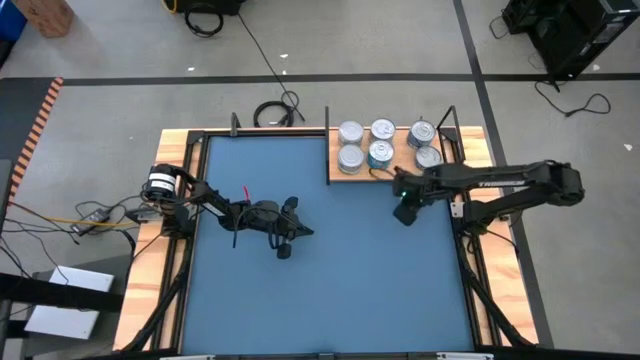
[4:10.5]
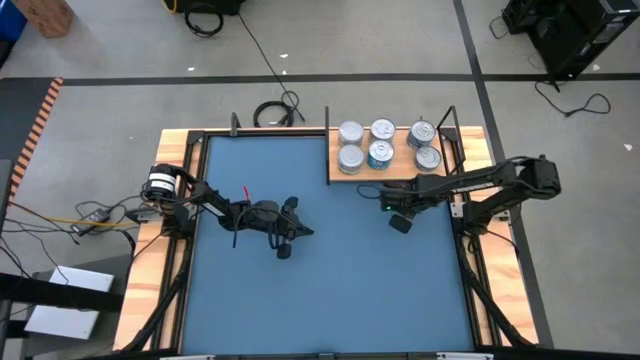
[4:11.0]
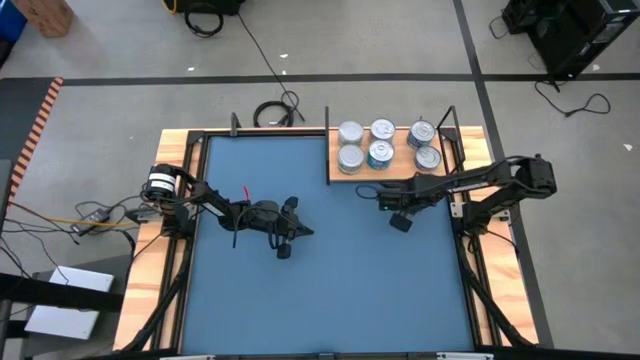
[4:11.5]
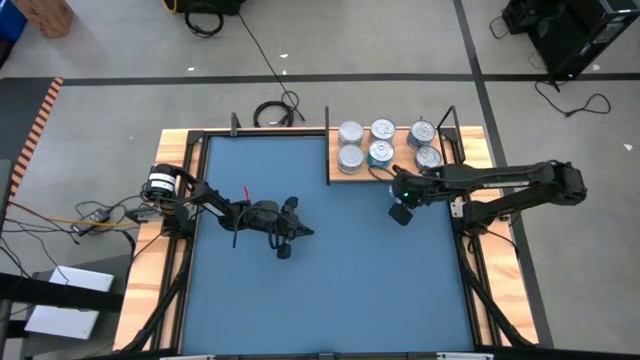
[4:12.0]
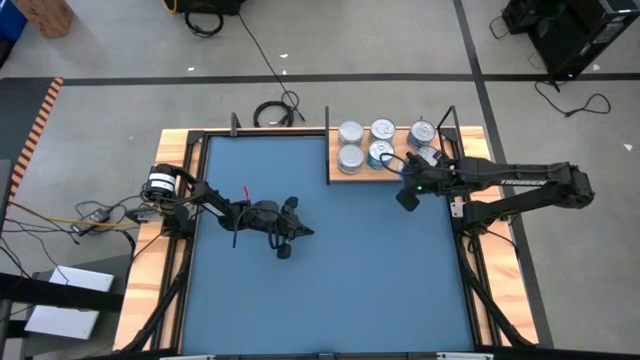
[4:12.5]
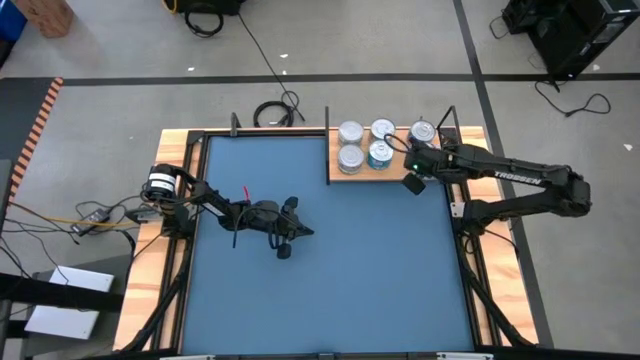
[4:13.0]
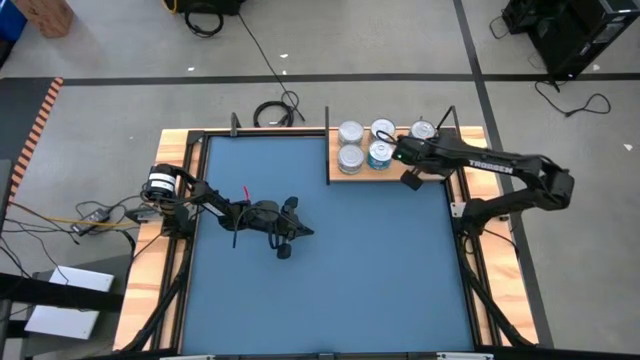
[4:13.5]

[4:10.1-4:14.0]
Task: Stack canned seafood by type on shelf
Stack the blue tuna can on to the blue tuna can on the shelf

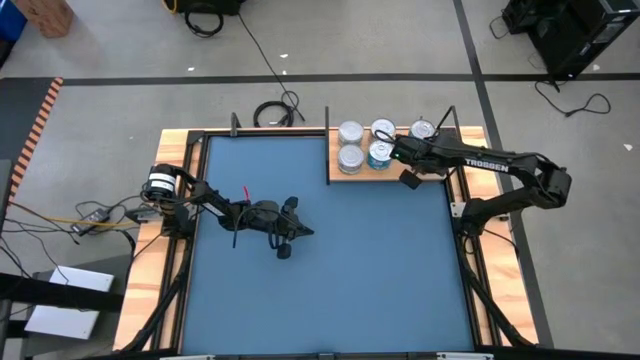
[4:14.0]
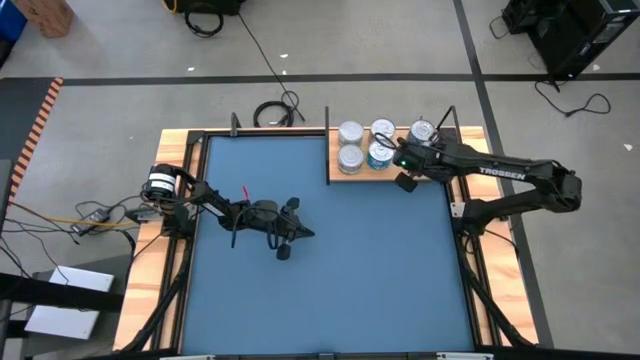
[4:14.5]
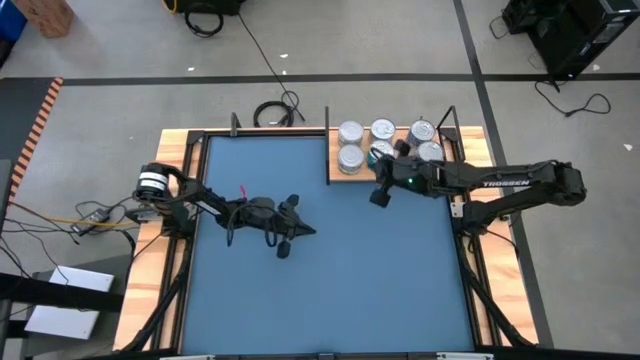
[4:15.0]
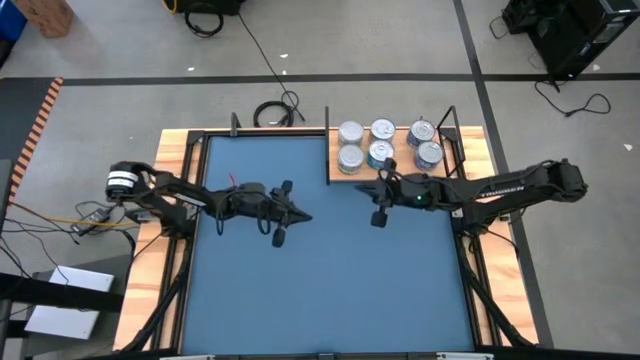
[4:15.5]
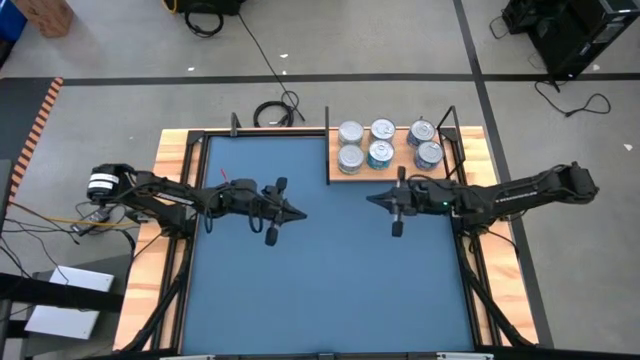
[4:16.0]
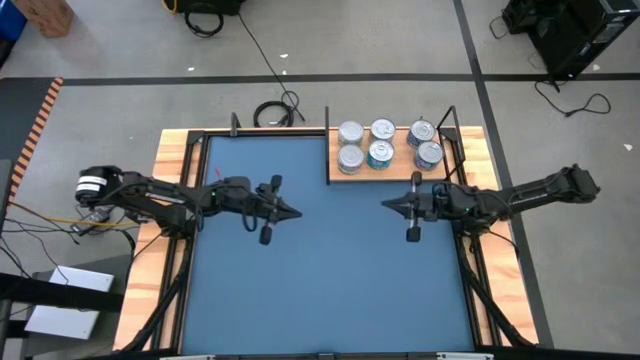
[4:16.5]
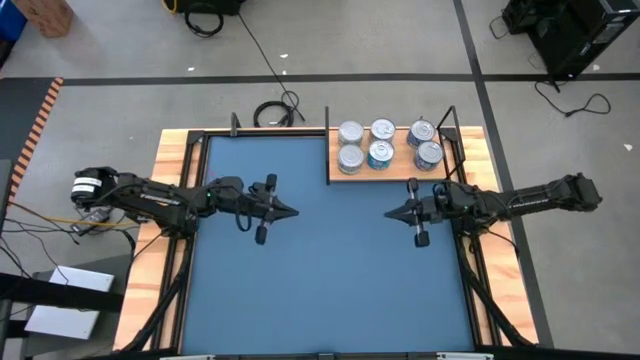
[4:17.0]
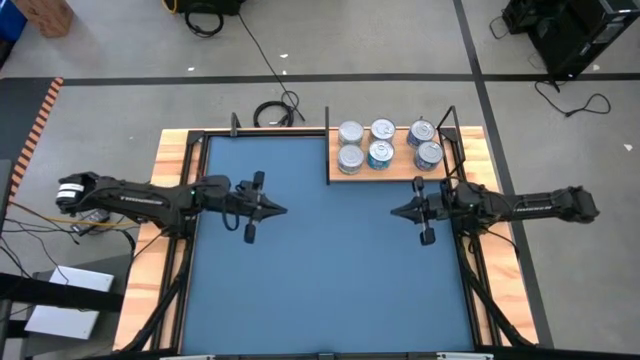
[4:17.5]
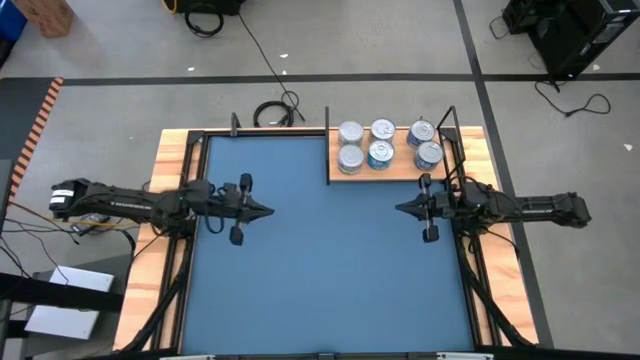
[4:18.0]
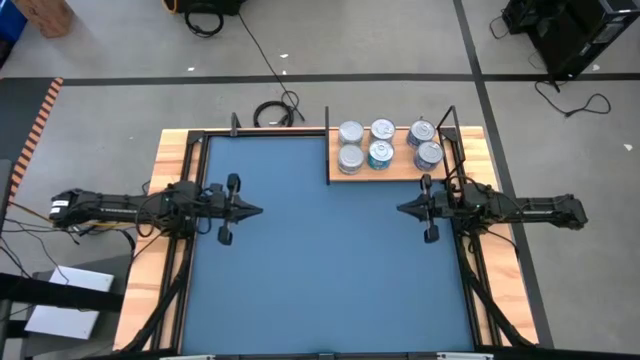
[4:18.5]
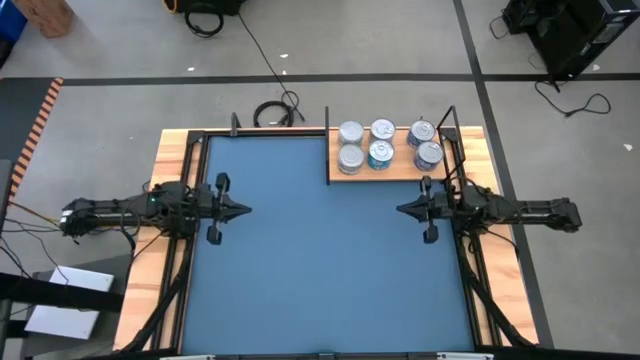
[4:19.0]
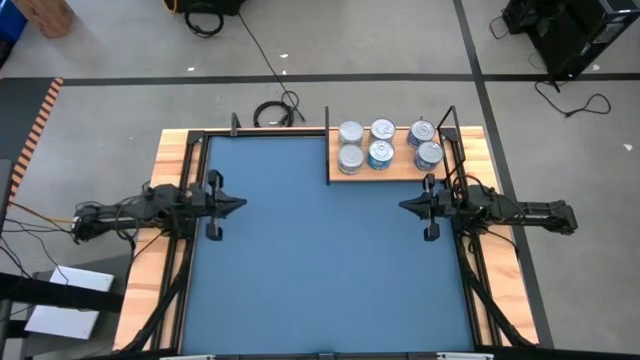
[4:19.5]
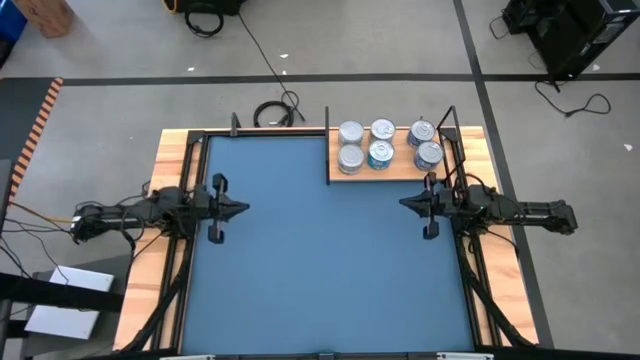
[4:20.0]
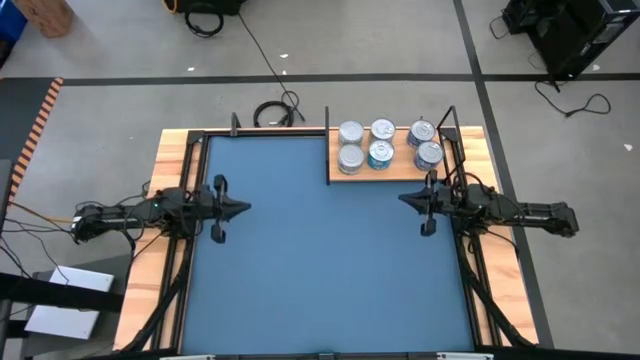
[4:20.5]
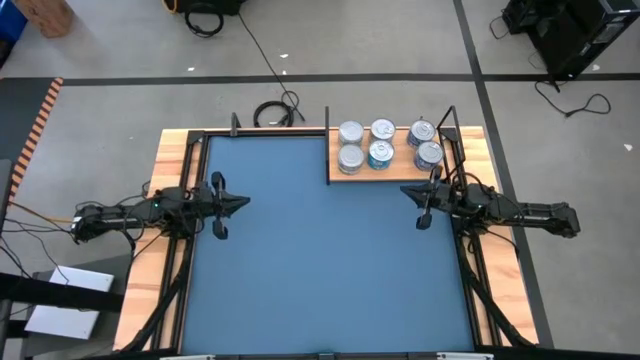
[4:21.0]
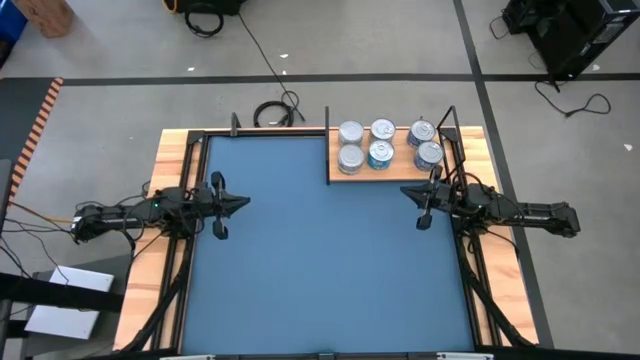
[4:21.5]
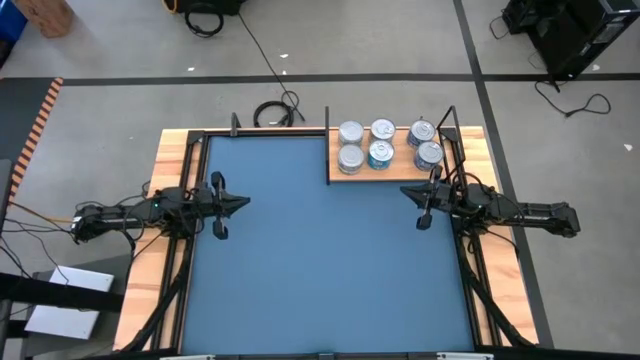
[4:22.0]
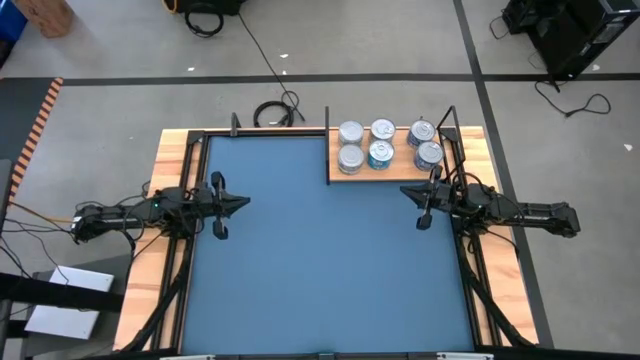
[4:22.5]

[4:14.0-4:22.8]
Return to Home Position

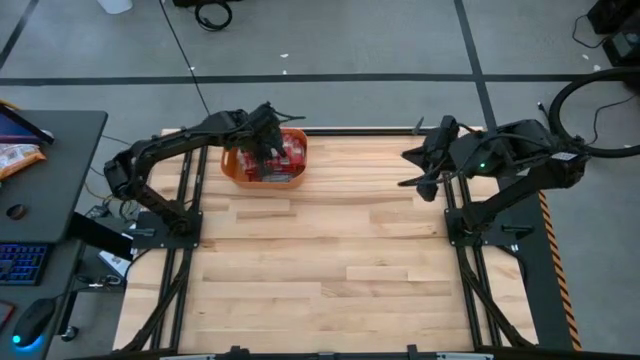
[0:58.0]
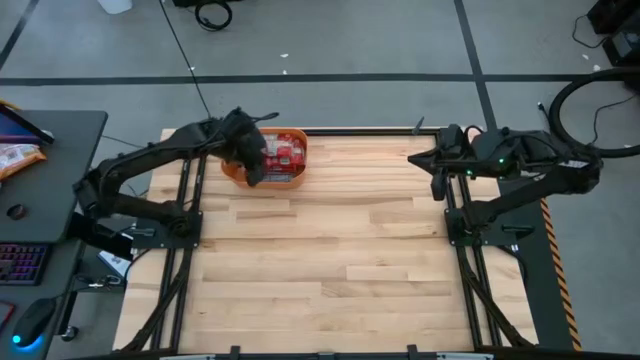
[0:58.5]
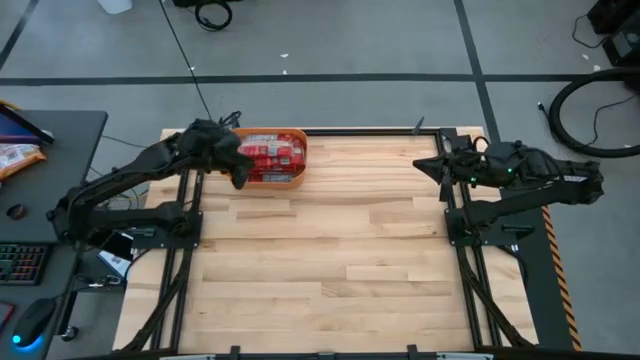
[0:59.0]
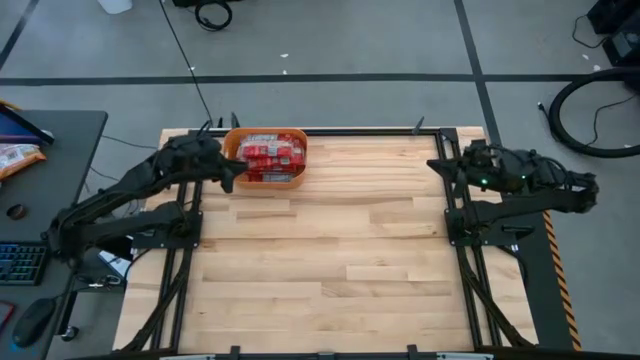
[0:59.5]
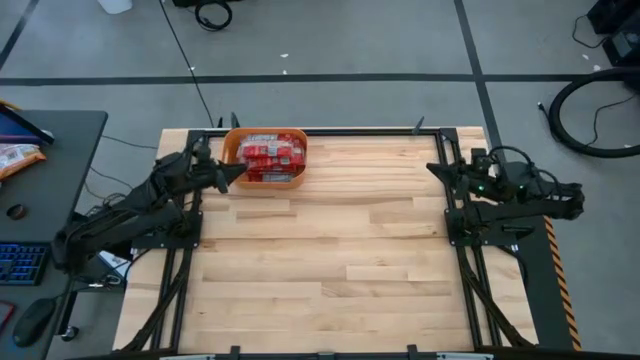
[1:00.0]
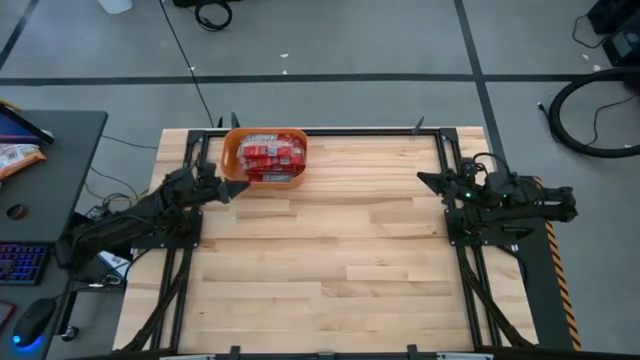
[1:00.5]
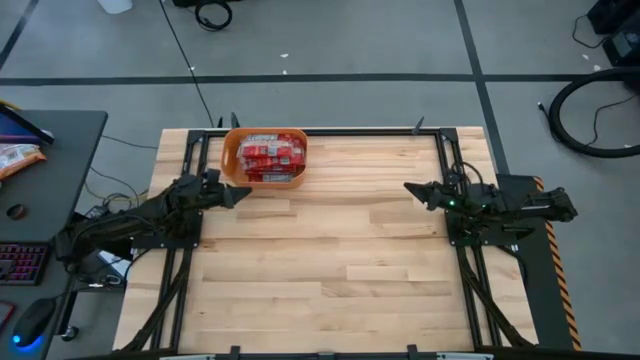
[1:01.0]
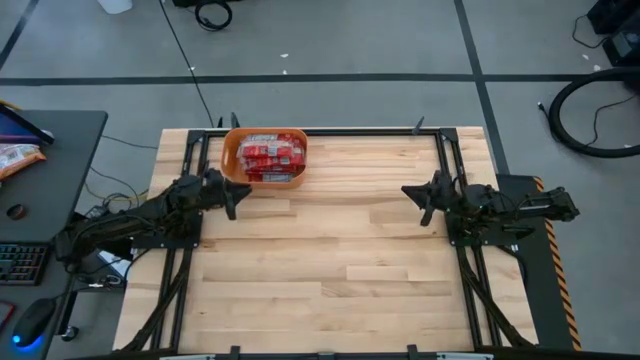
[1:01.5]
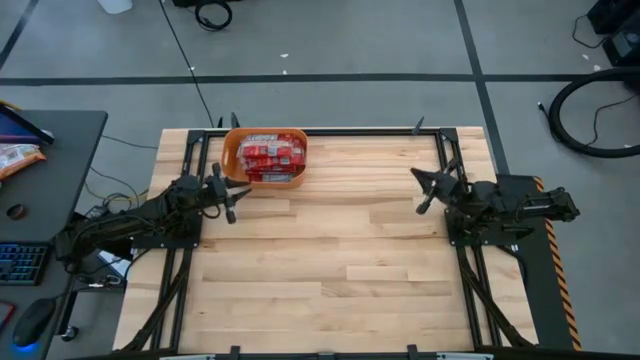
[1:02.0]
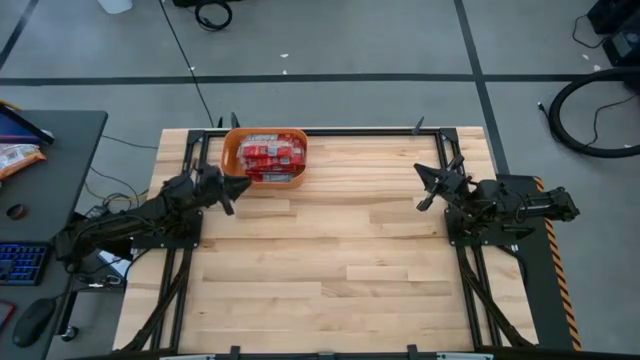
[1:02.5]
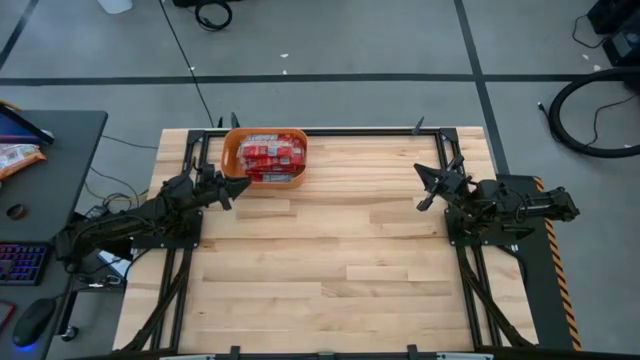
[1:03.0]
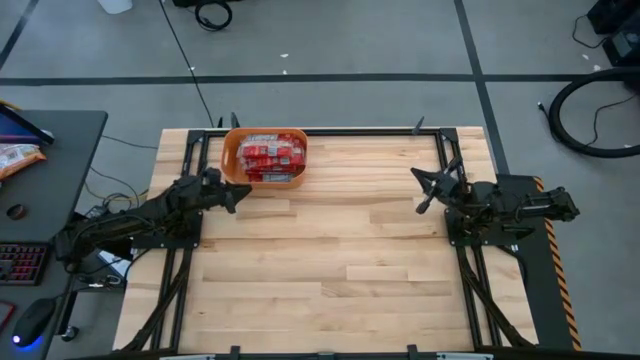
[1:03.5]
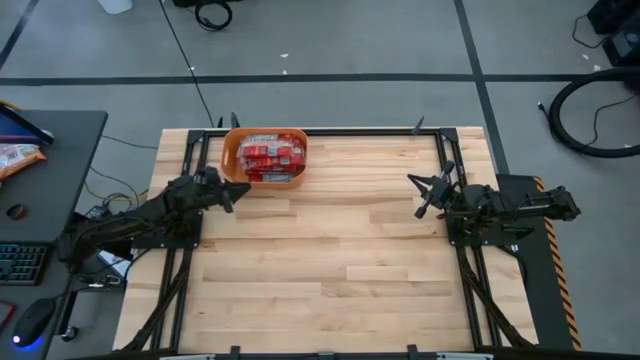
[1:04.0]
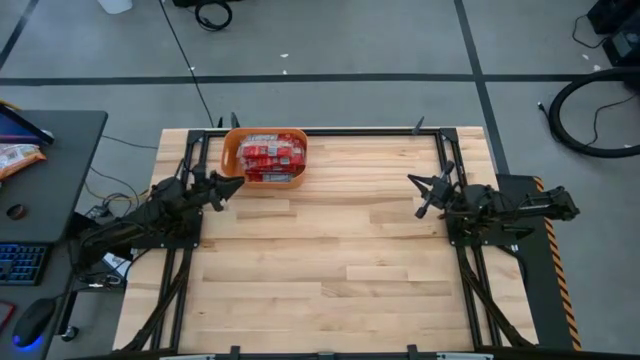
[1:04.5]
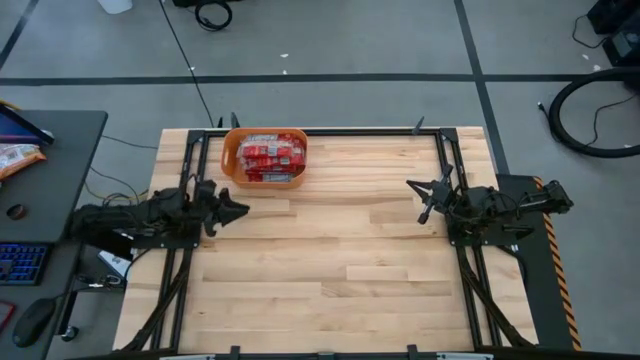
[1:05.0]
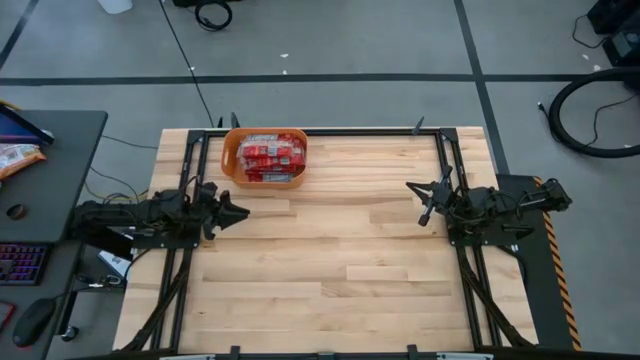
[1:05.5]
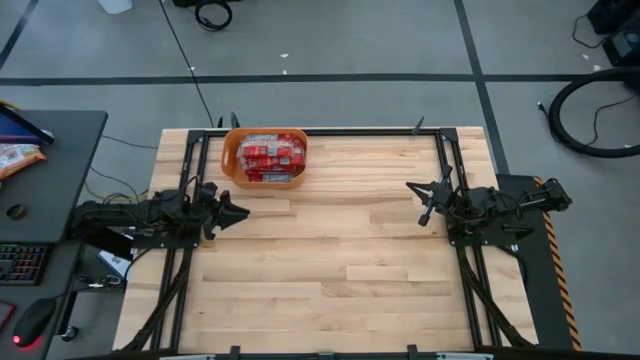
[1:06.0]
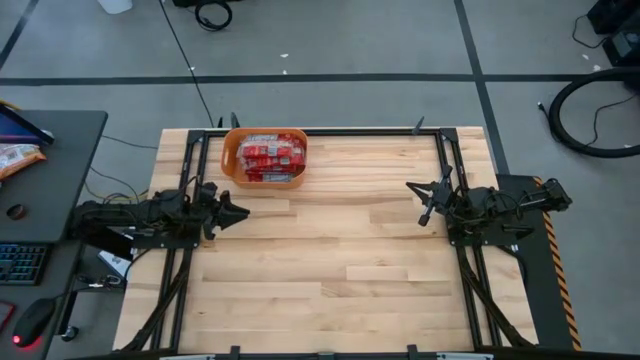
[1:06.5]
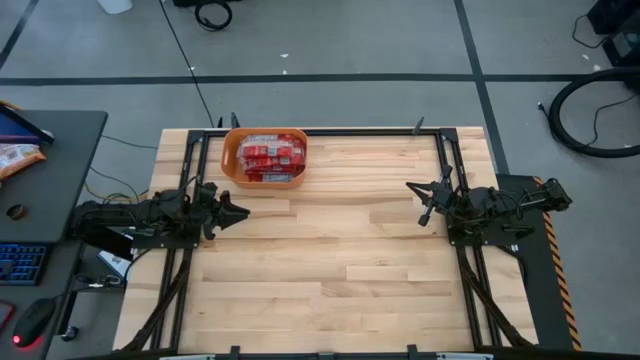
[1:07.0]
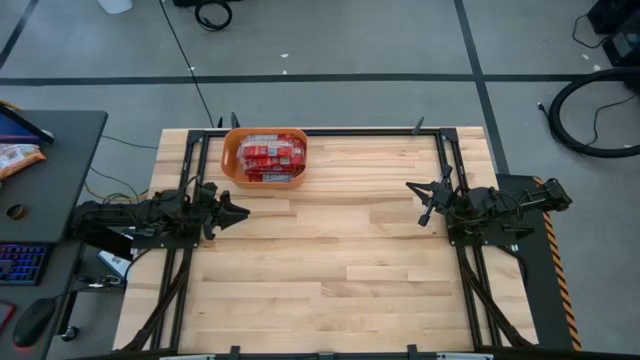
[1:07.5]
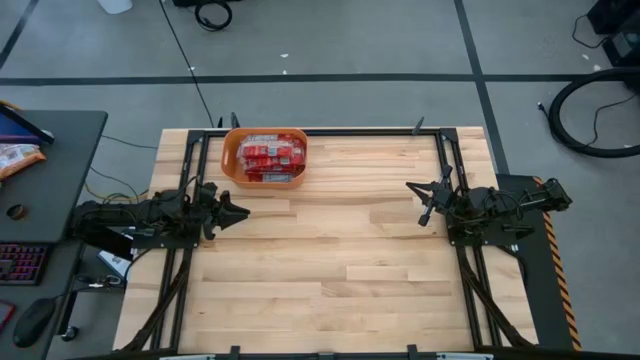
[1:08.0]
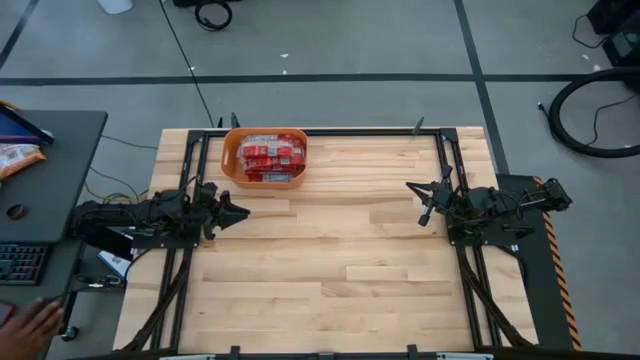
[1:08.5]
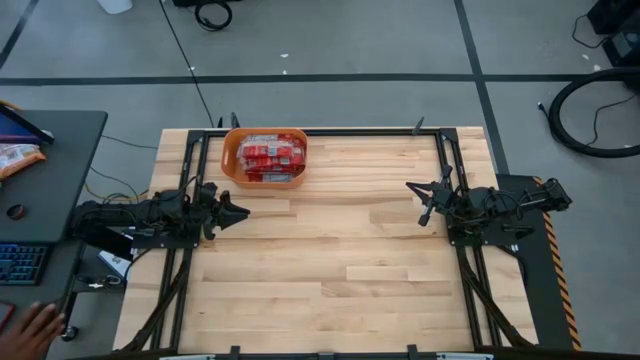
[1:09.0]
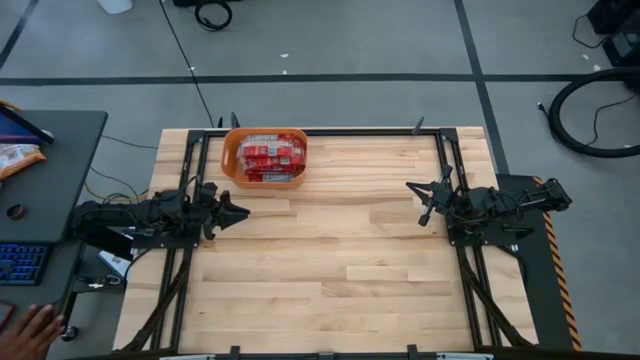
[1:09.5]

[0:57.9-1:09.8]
Task: Sort popcorn bags into baskets
Return to Home Position
